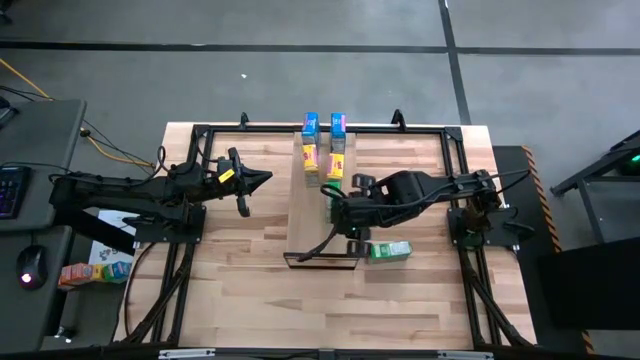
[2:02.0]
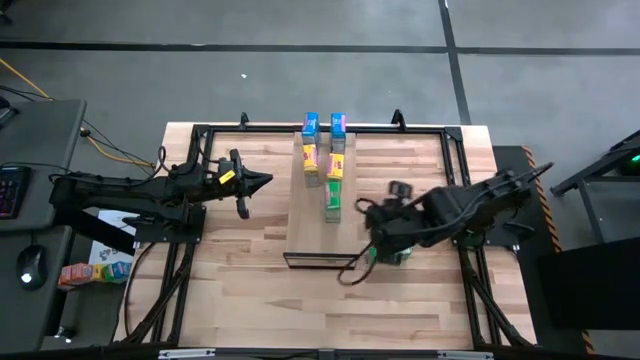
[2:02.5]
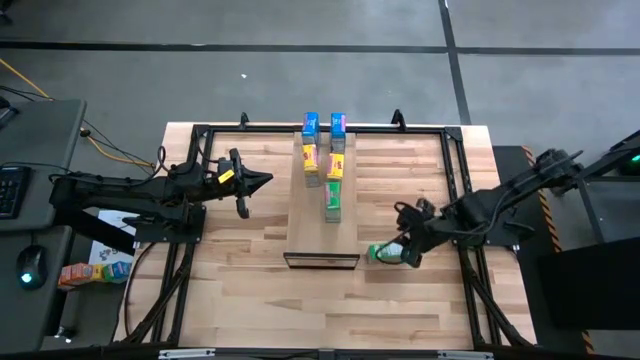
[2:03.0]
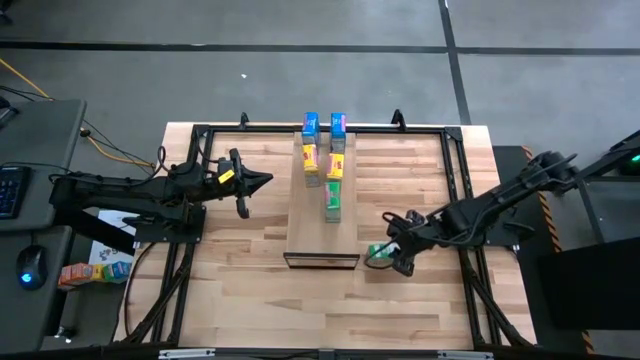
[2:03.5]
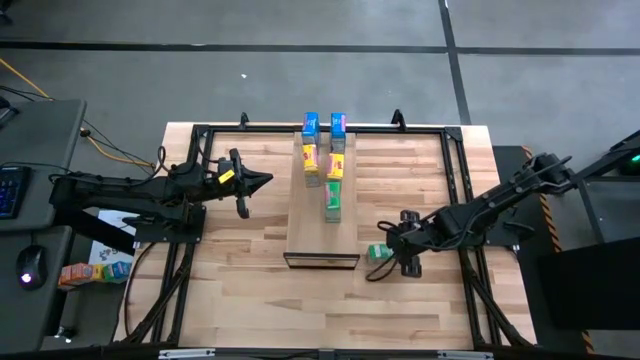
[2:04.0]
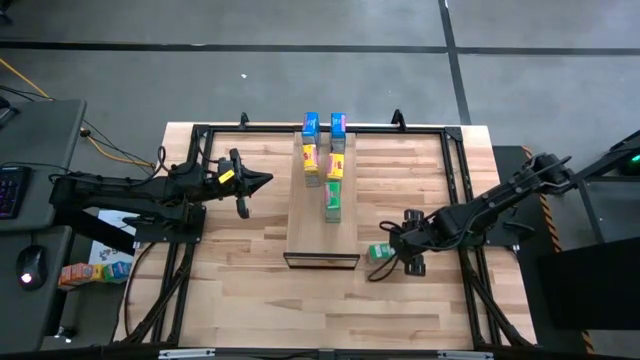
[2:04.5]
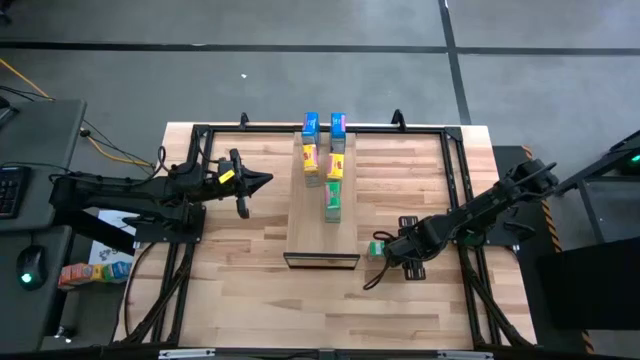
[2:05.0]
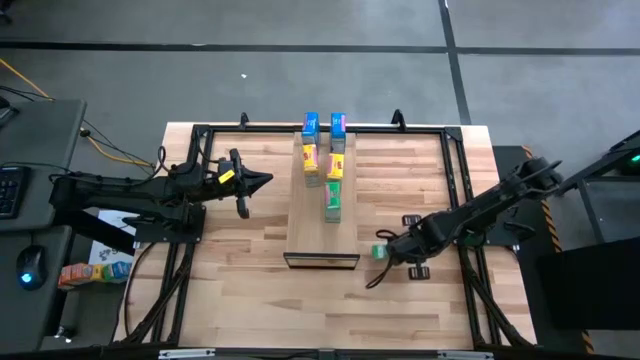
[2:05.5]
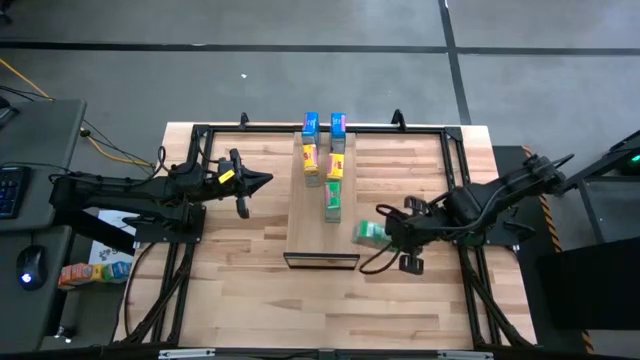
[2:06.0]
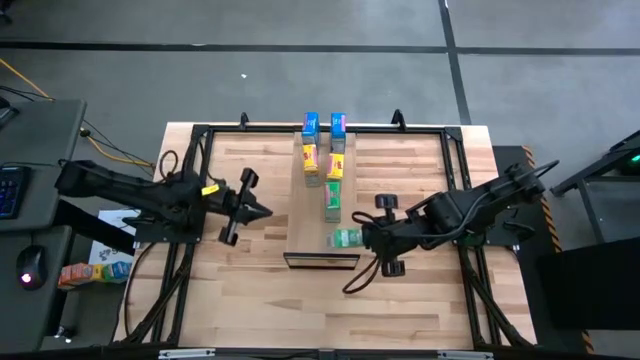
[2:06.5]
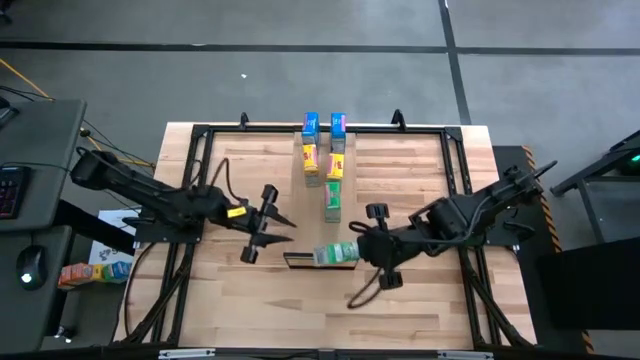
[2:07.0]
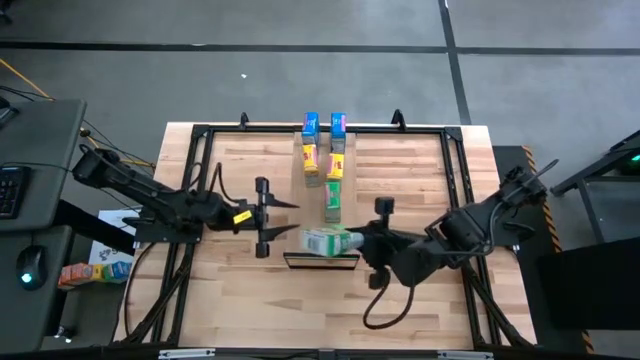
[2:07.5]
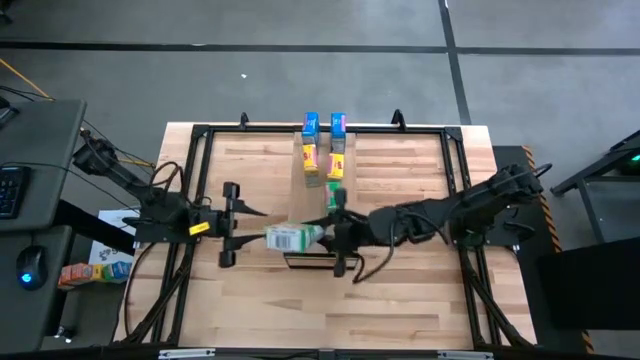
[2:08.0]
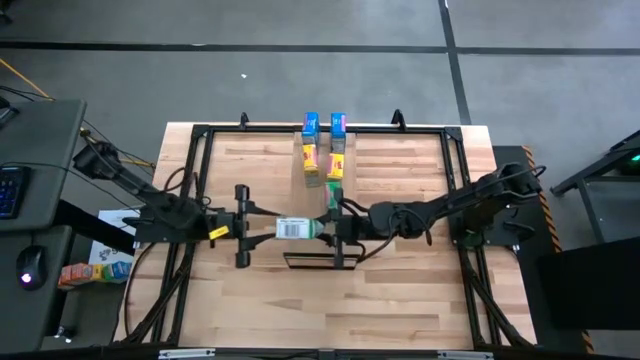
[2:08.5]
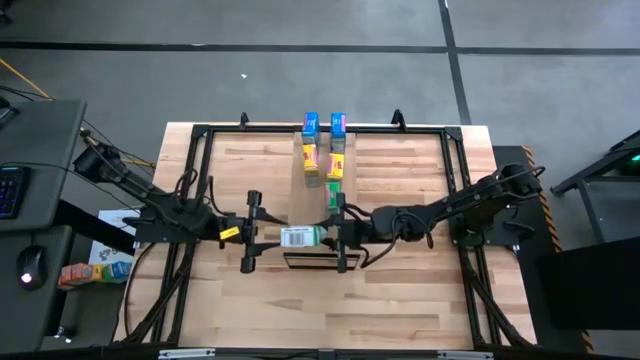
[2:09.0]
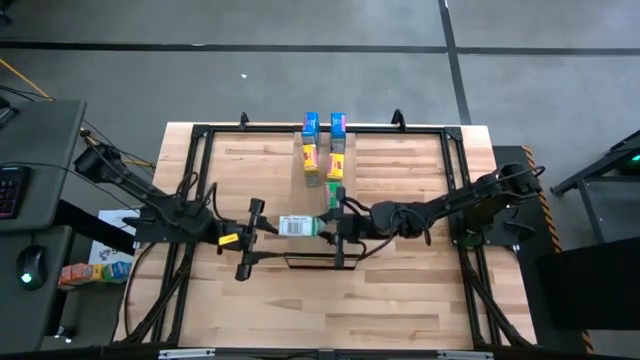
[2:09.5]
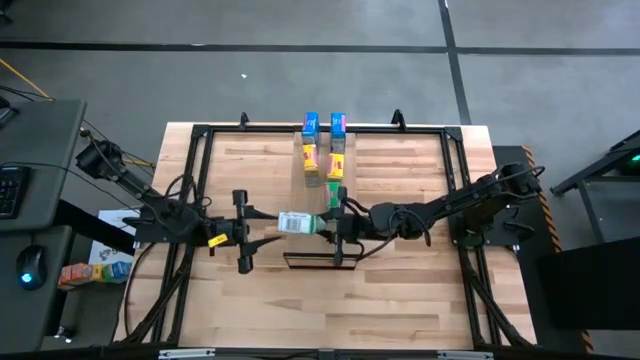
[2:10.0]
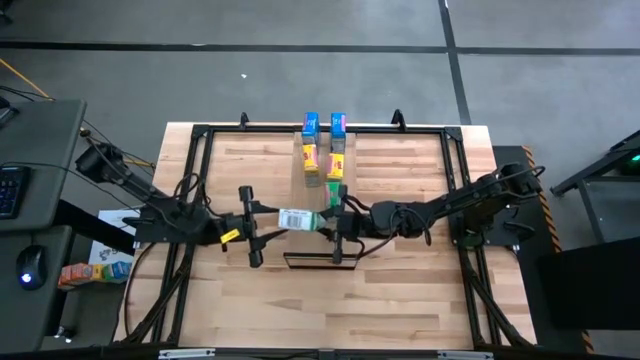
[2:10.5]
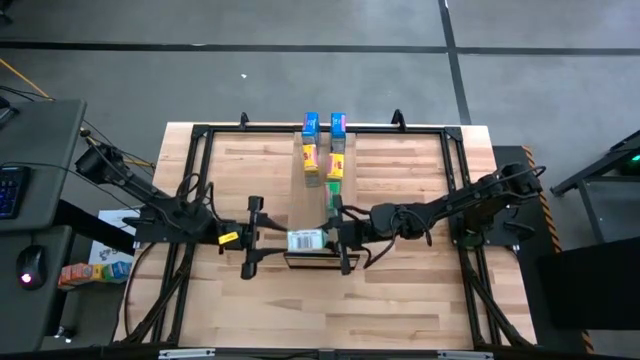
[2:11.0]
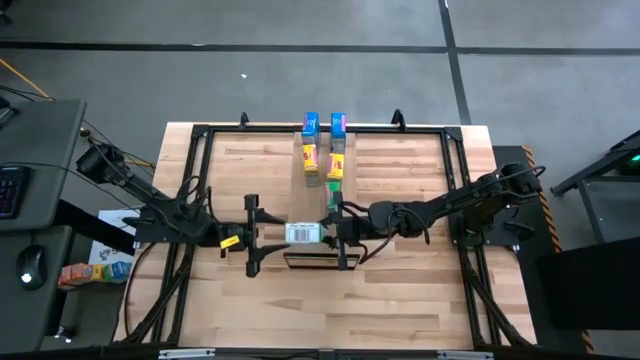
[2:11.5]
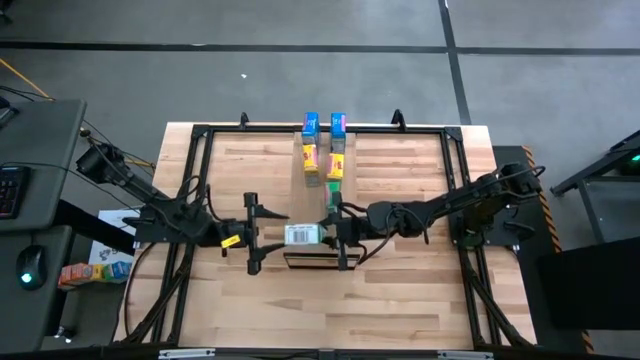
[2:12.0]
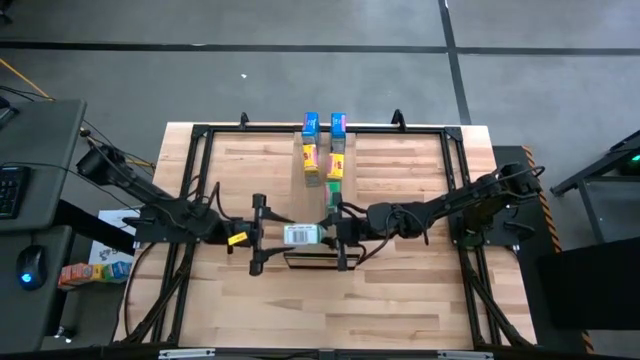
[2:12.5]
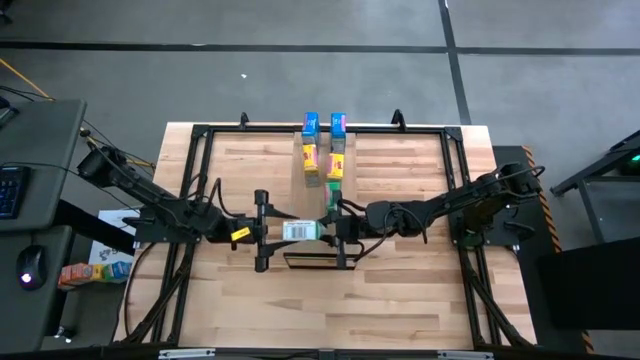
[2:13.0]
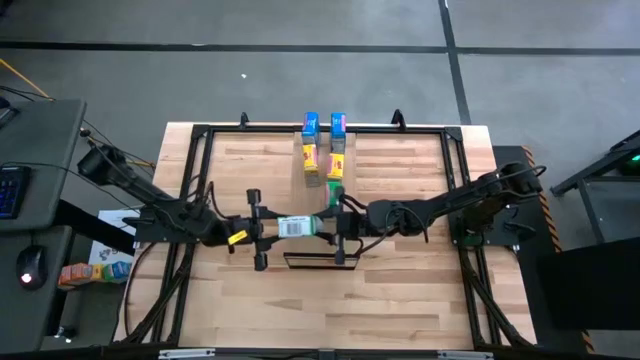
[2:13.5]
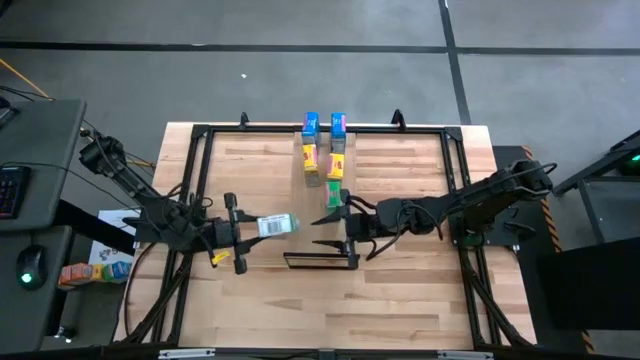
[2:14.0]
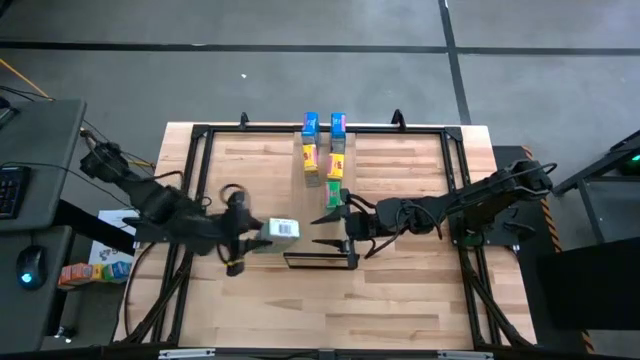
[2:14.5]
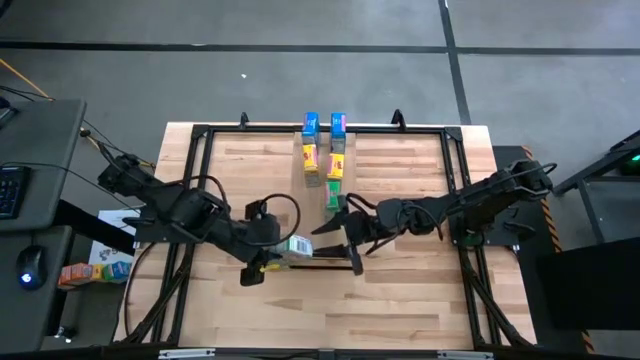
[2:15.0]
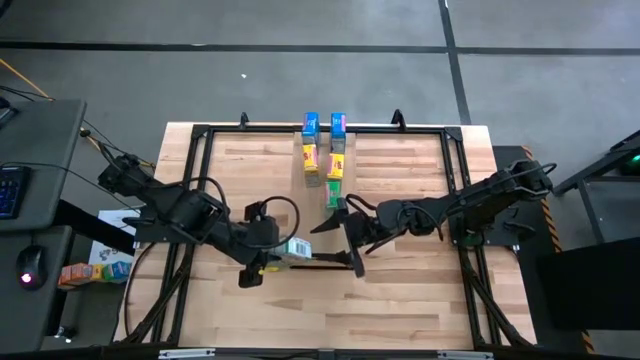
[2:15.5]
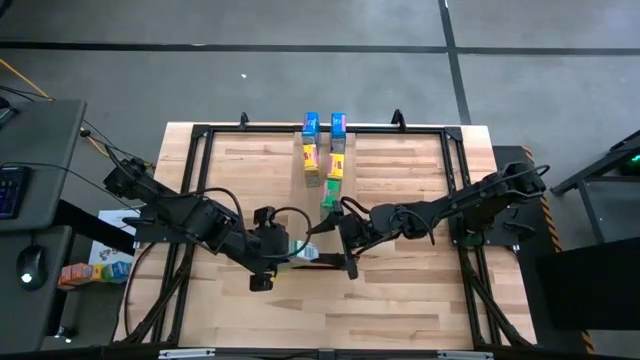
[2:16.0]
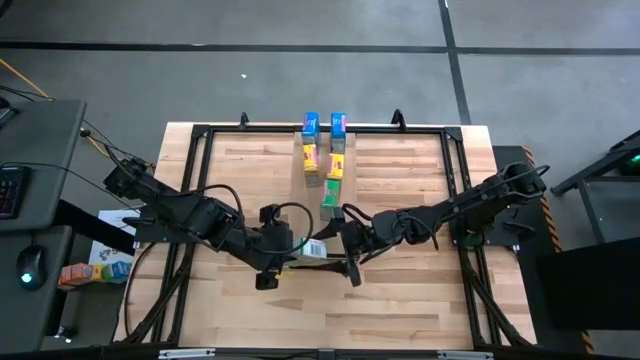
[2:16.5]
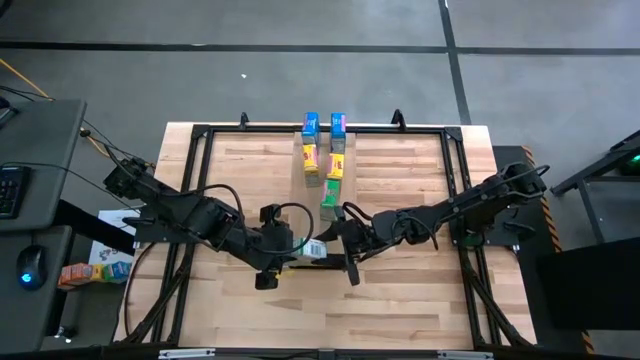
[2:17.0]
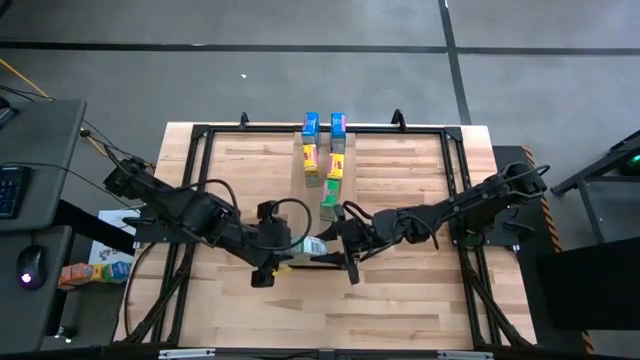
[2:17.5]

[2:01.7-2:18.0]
Task: Stack cereal on shelf
Put the green cereal box on the shelf

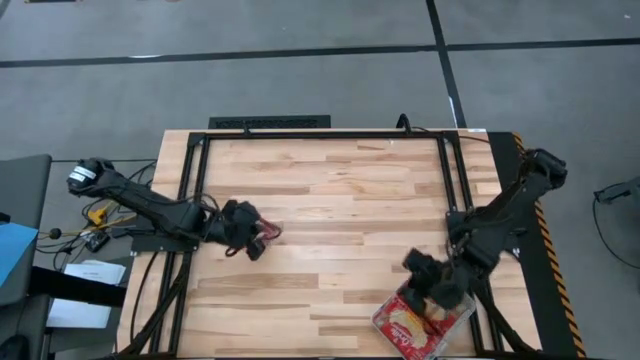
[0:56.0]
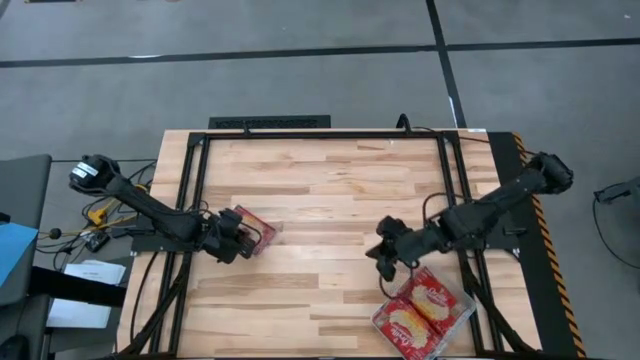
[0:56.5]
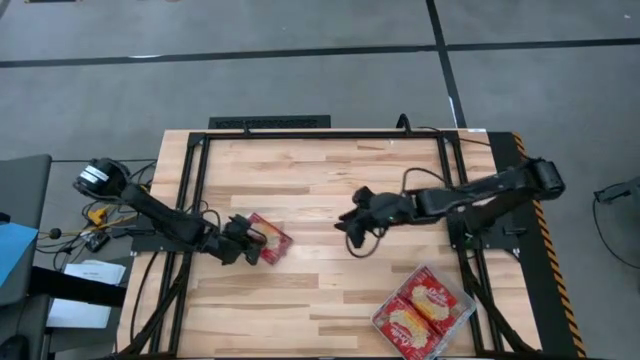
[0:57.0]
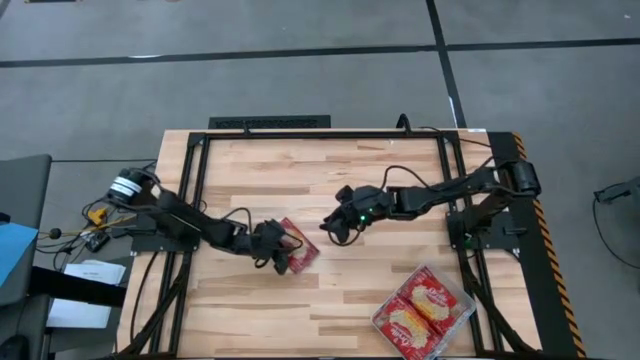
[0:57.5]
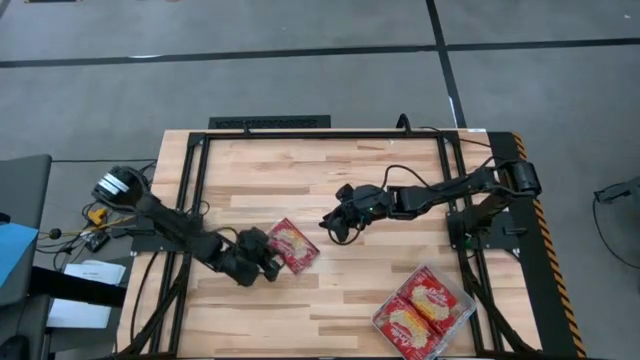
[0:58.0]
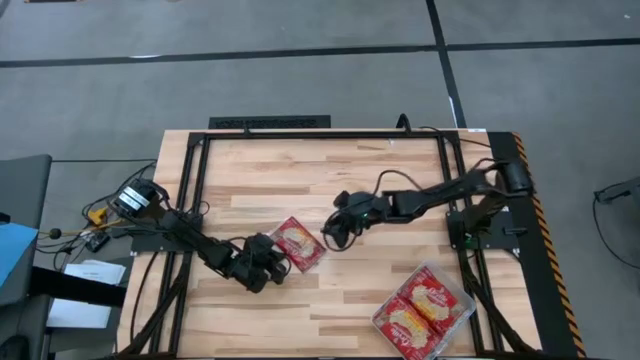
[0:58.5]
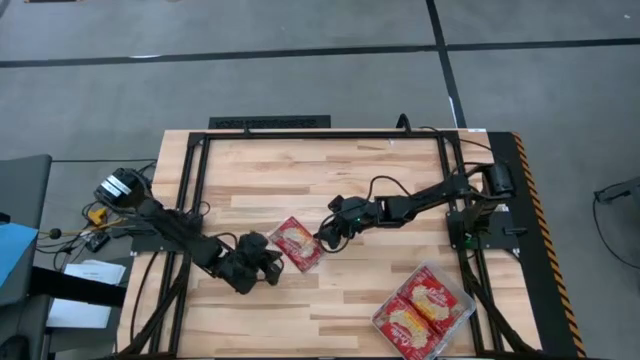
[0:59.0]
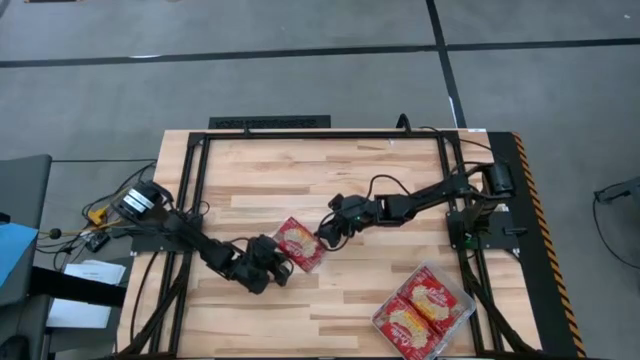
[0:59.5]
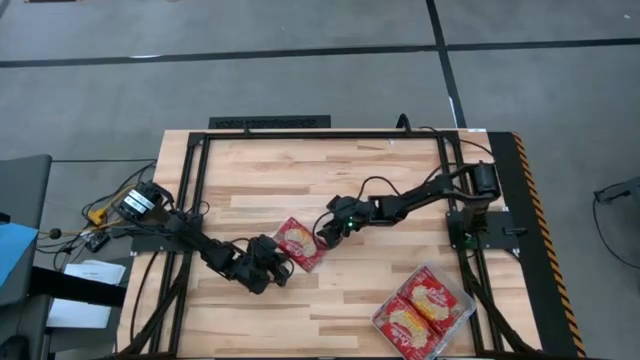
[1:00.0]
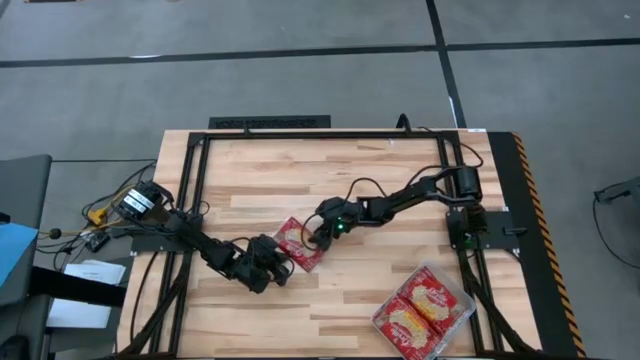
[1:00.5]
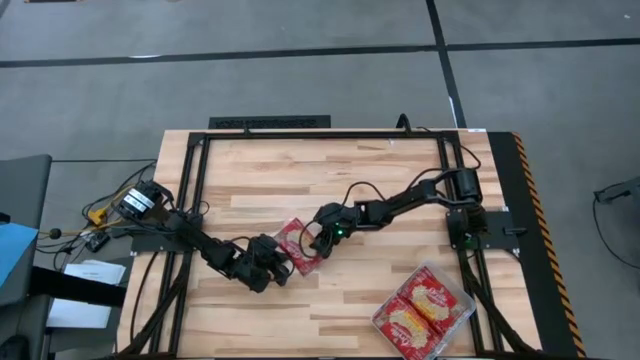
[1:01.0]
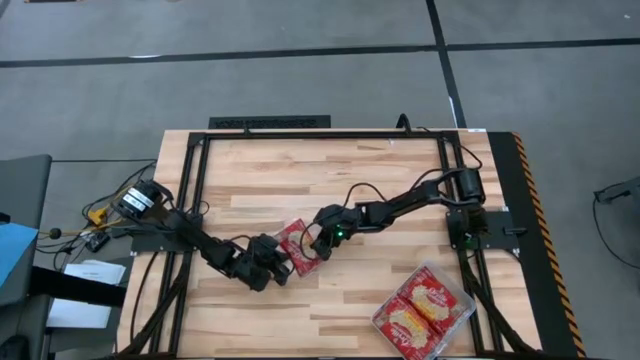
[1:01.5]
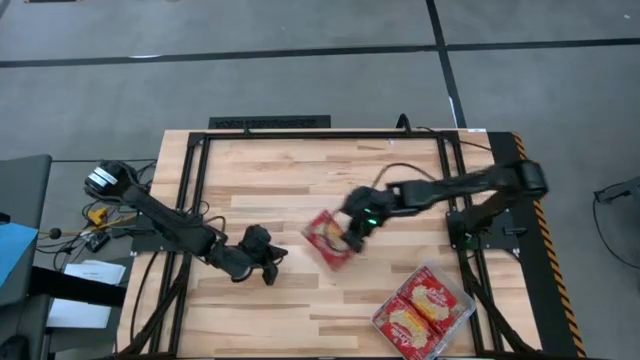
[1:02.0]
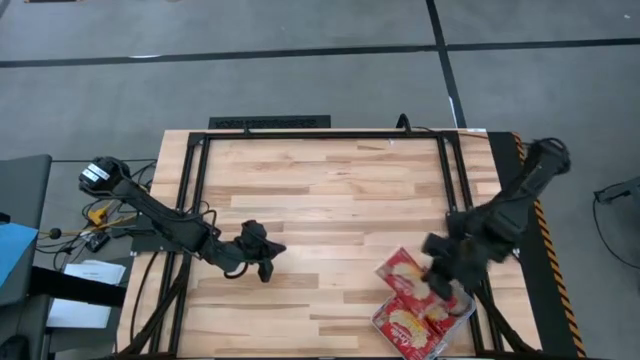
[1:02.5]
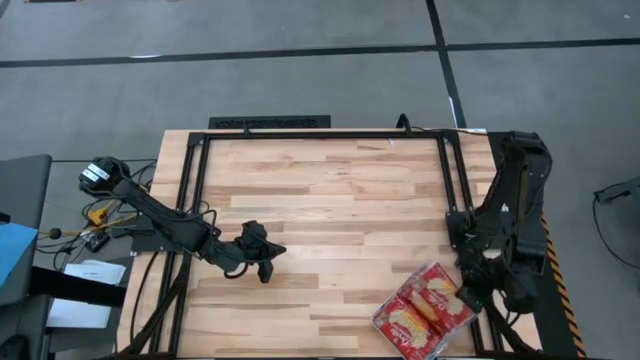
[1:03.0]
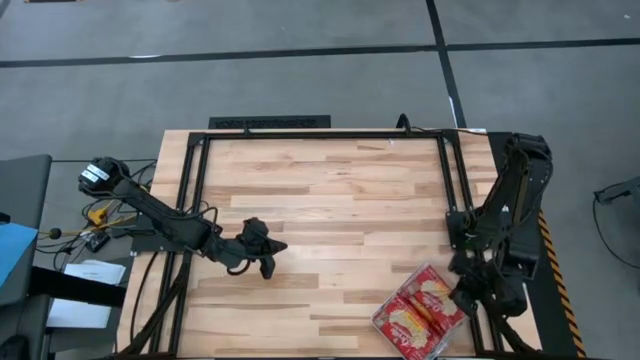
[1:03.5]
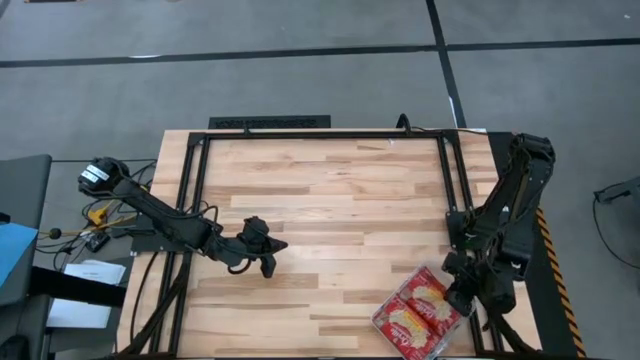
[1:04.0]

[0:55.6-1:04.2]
Task: Sort popcorn bags into baskets
Put the red popcorn bag into the transparent bin
